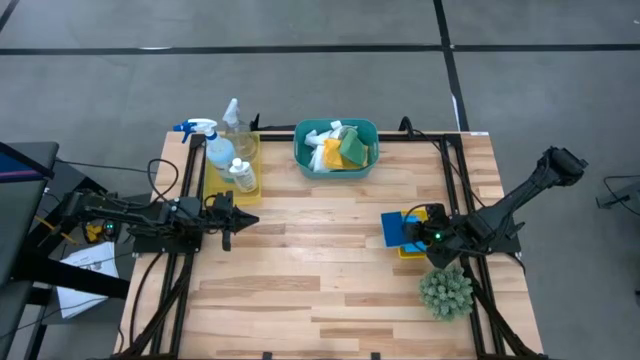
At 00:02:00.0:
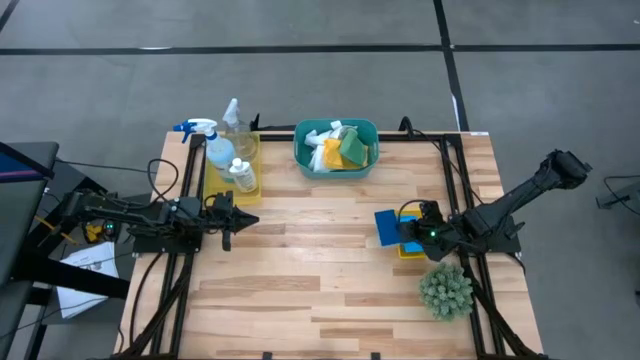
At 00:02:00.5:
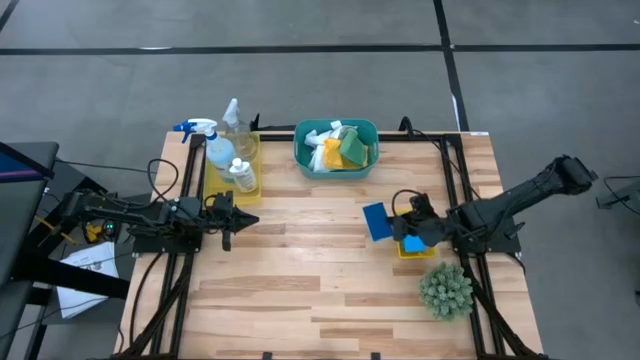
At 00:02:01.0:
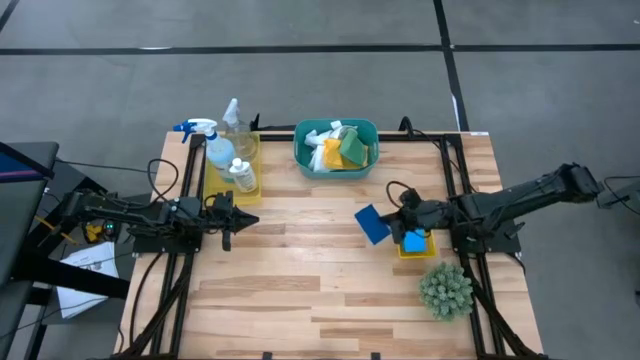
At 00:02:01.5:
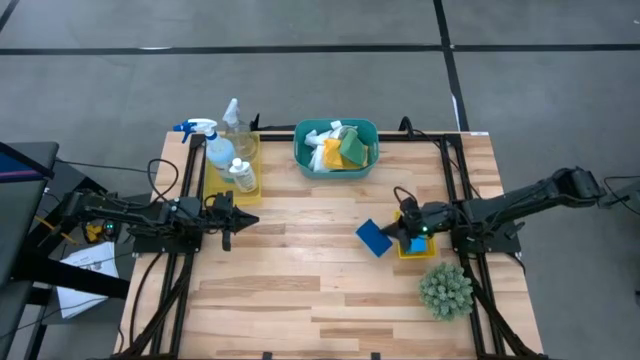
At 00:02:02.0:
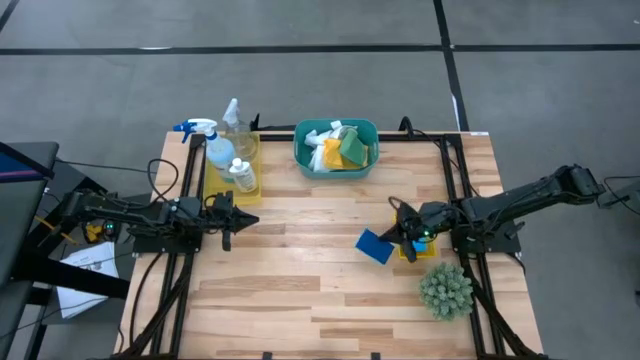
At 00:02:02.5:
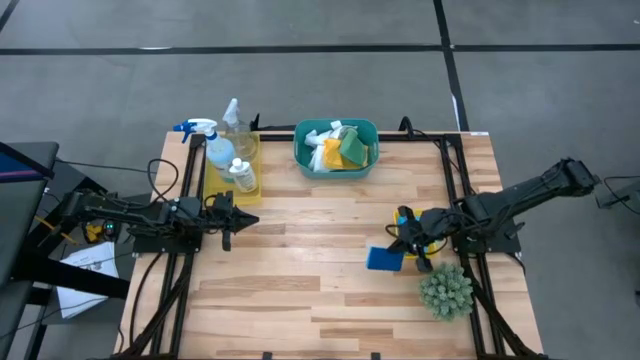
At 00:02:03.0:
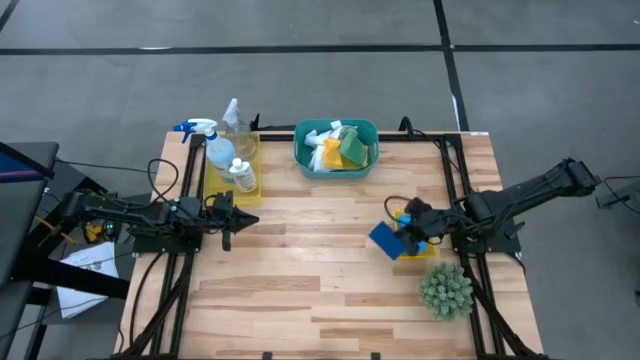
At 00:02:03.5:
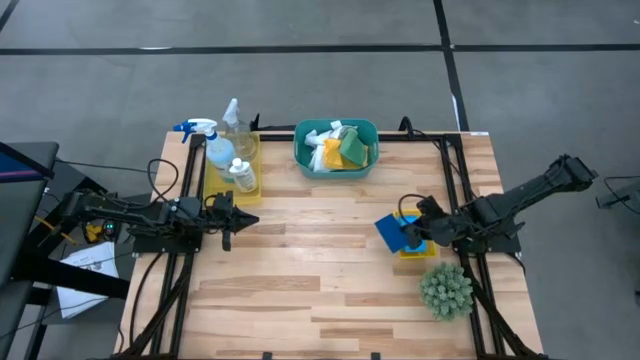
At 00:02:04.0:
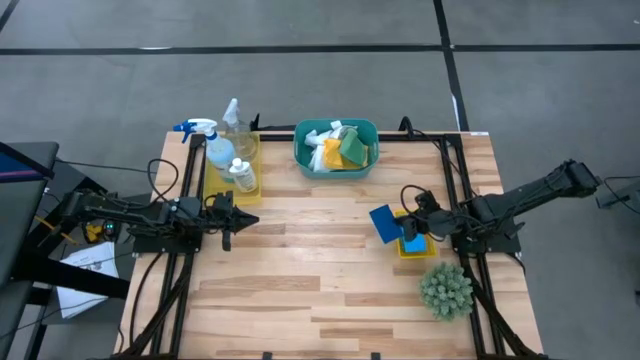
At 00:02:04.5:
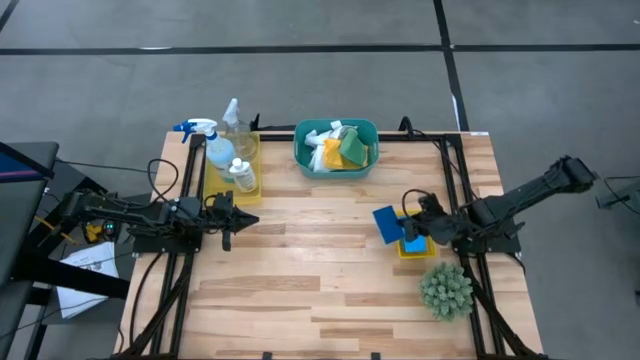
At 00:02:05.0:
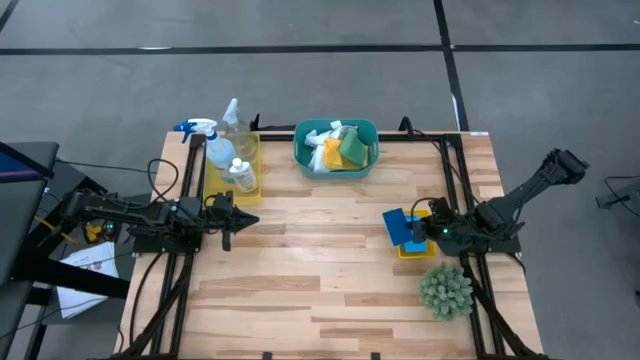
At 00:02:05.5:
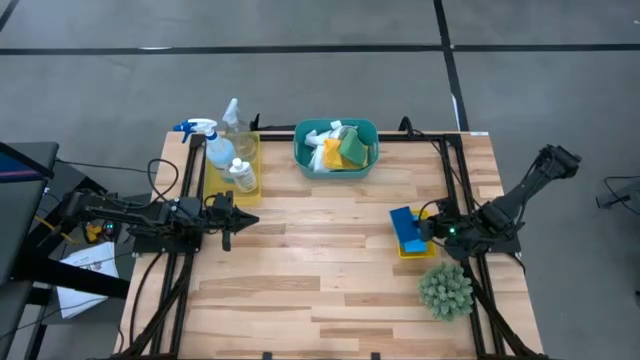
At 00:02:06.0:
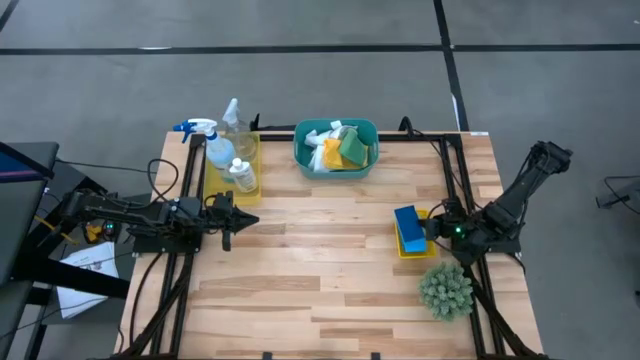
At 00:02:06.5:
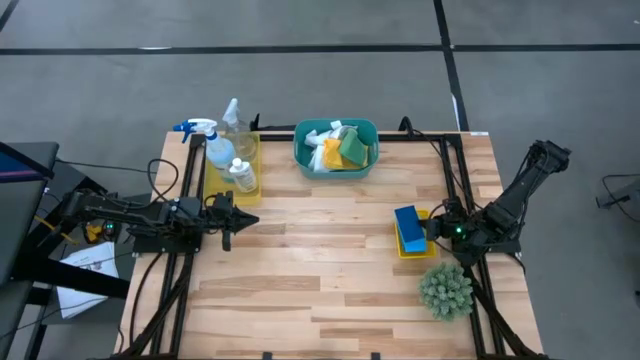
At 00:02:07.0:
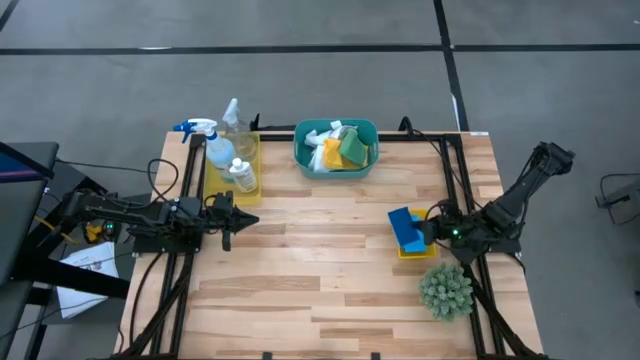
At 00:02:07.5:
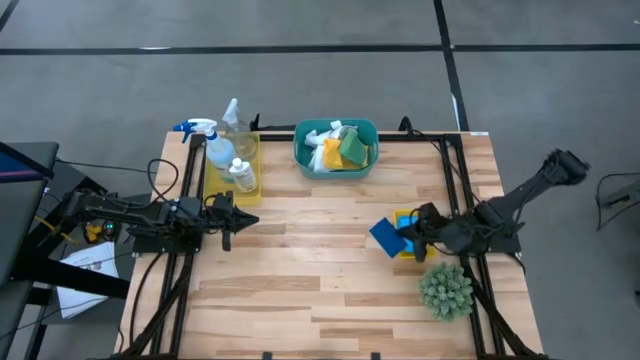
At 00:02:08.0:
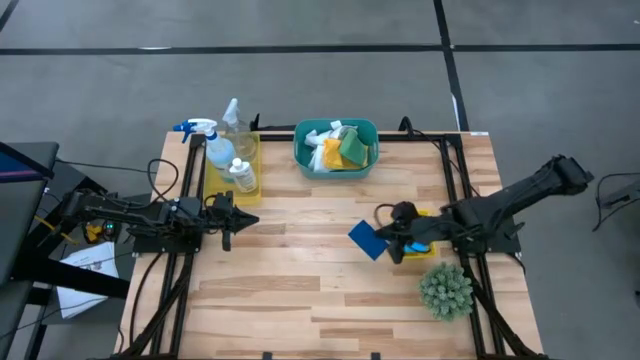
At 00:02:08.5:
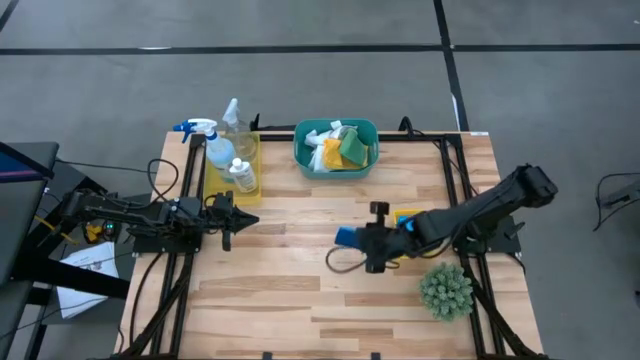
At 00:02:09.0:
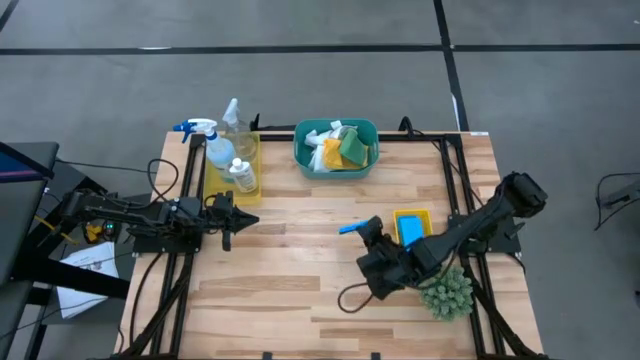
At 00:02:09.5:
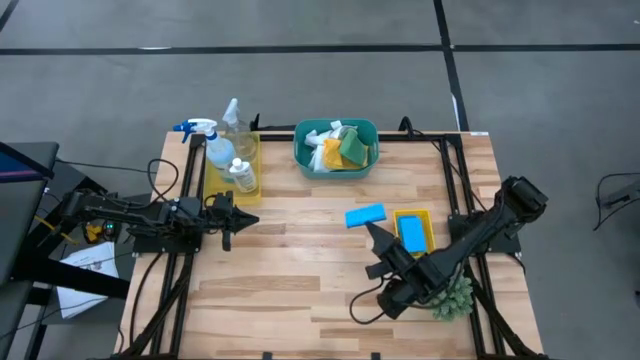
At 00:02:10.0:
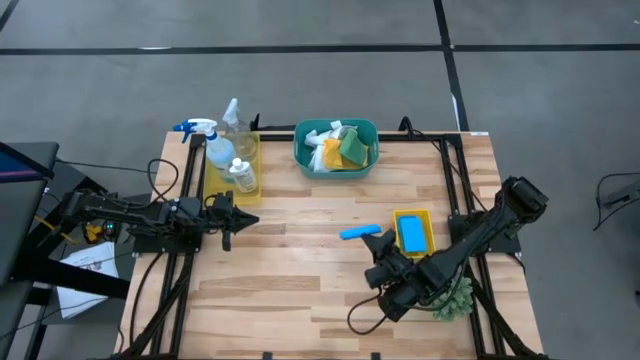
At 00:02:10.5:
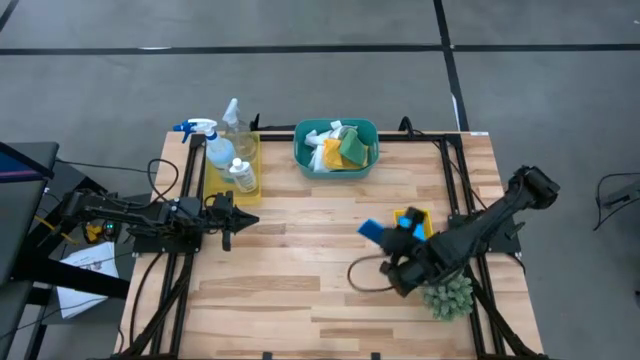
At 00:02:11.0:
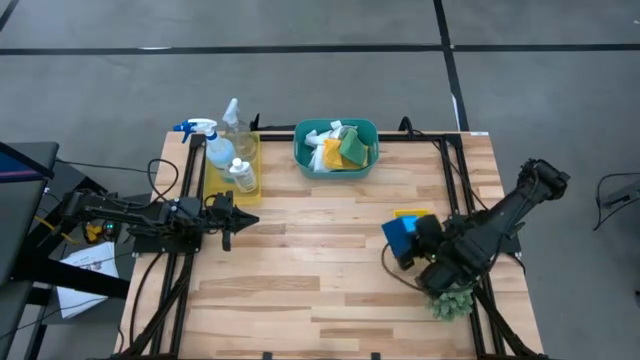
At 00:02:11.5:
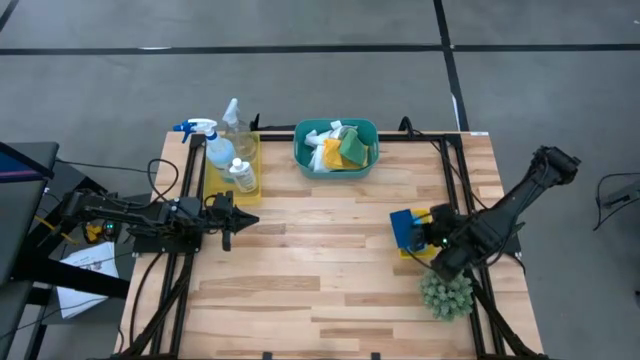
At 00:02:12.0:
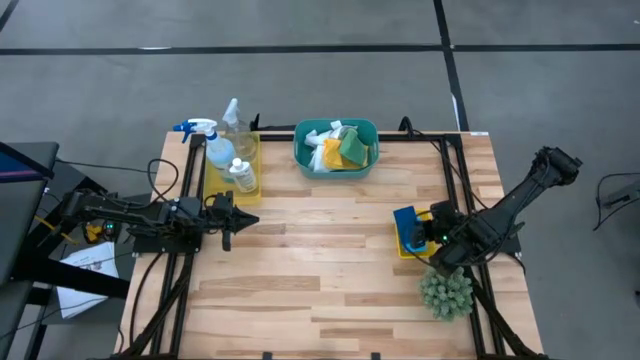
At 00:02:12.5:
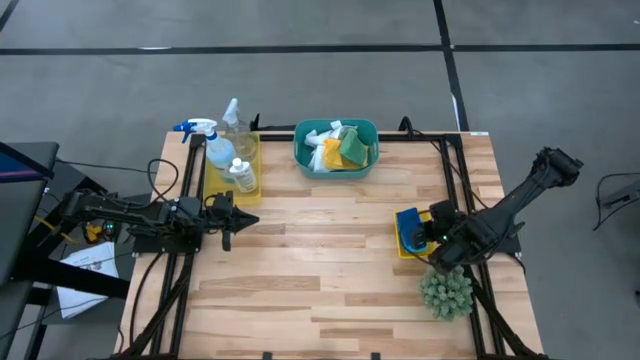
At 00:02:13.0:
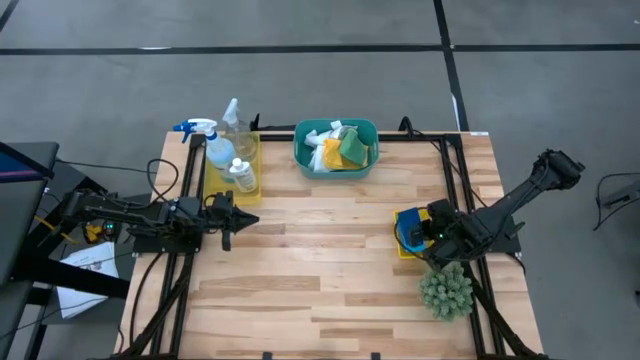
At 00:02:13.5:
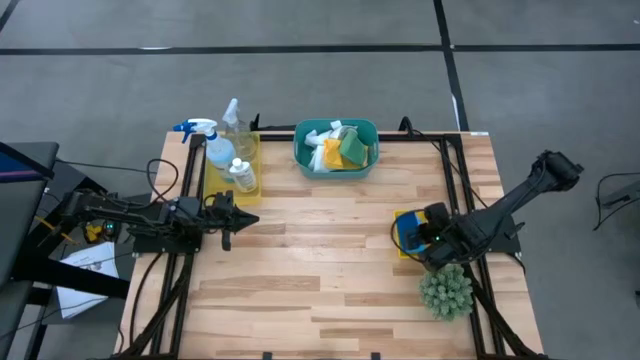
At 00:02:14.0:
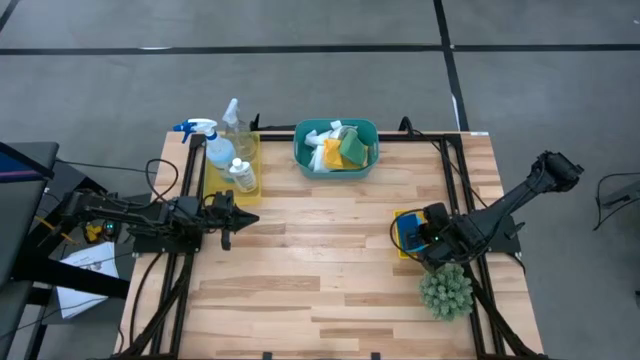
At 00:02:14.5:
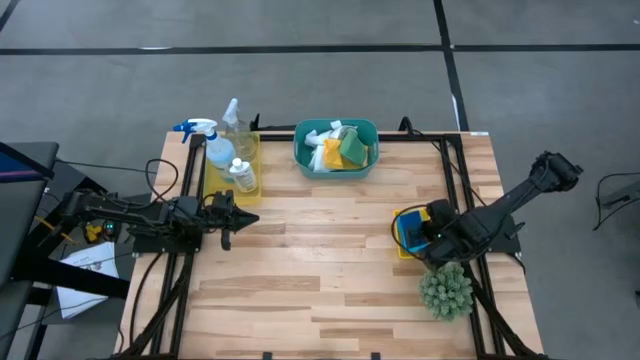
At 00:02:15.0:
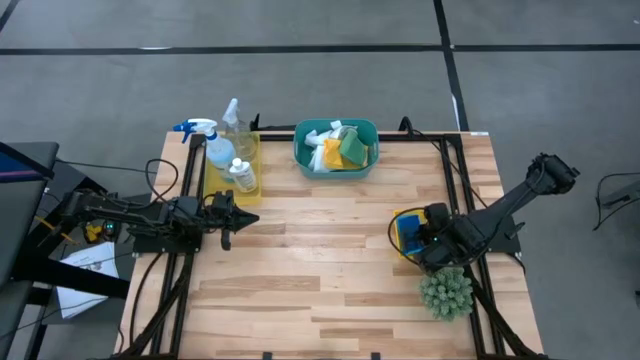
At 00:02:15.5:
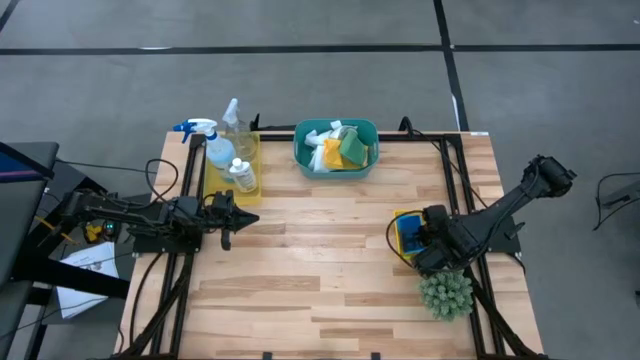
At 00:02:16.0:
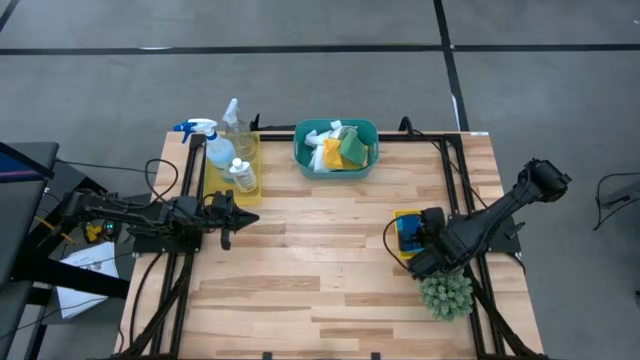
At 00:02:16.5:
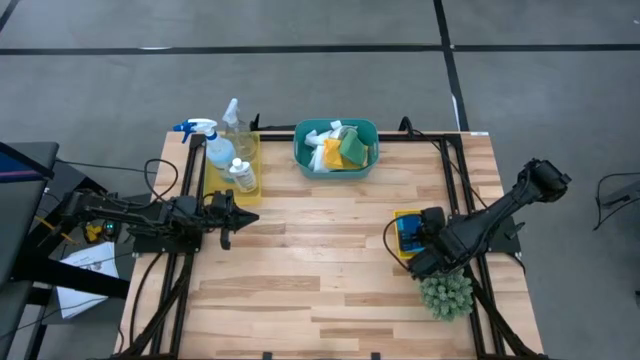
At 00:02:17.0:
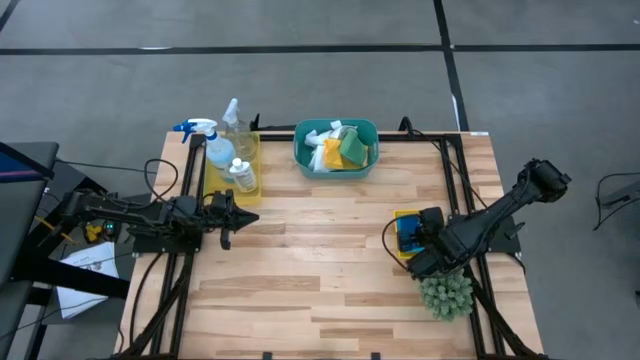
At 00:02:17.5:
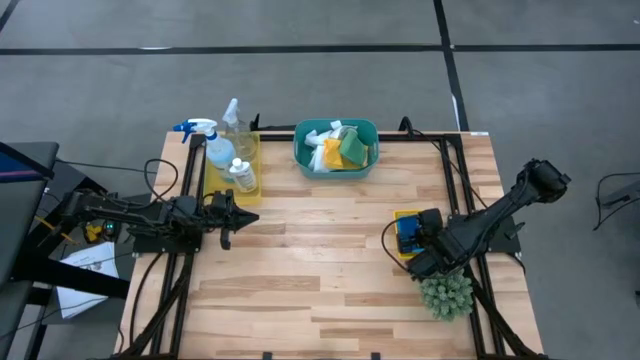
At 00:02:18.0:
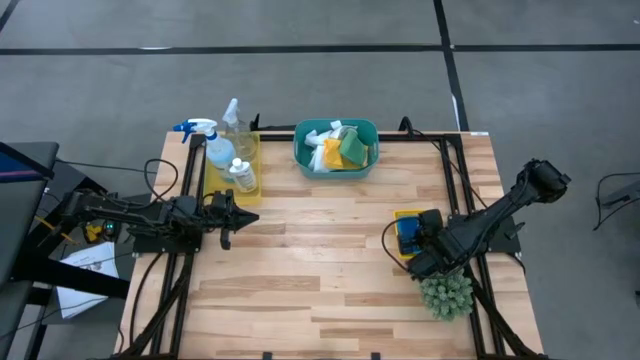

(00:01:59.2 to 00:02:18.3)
Task: Pick & Place Kitchen Items
Put the blue sponge into the right yellow bin
